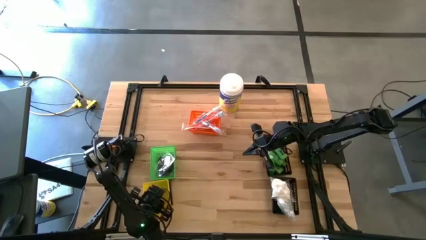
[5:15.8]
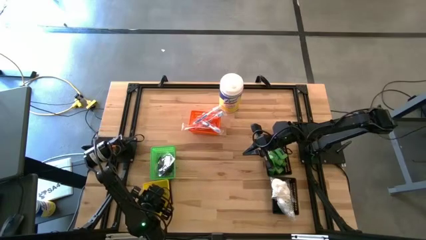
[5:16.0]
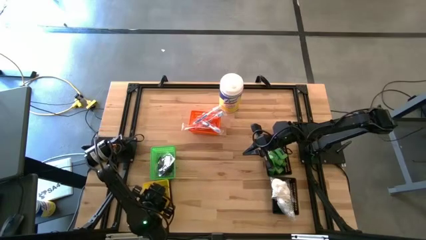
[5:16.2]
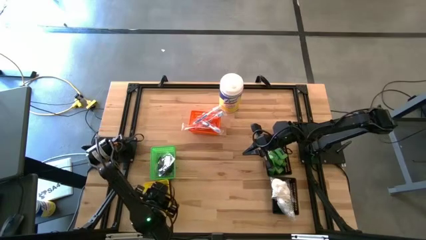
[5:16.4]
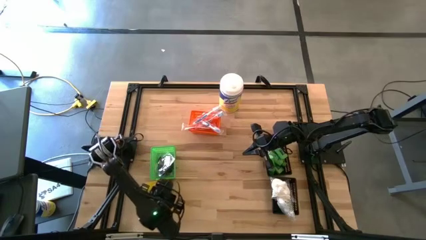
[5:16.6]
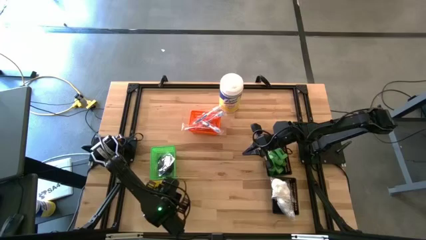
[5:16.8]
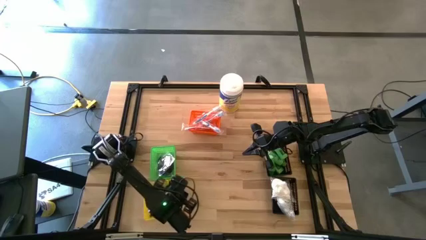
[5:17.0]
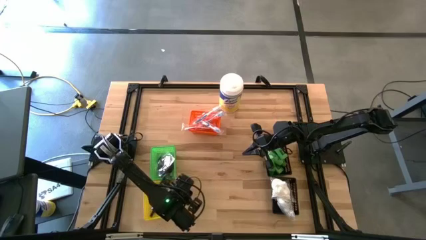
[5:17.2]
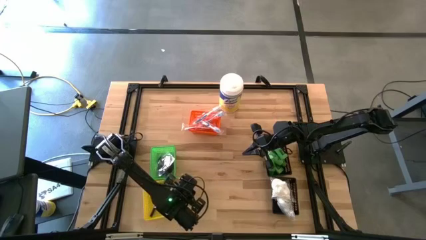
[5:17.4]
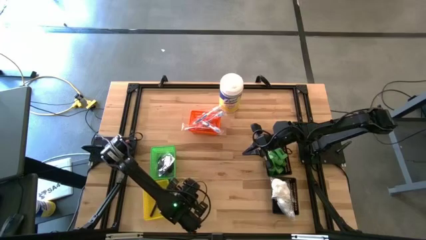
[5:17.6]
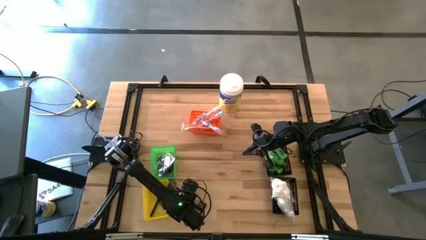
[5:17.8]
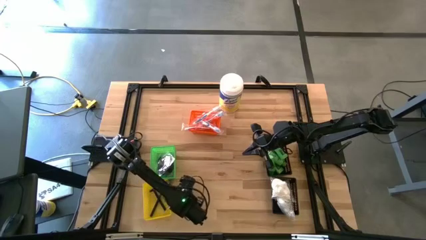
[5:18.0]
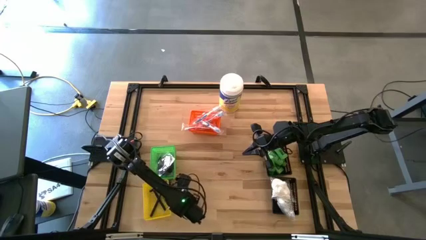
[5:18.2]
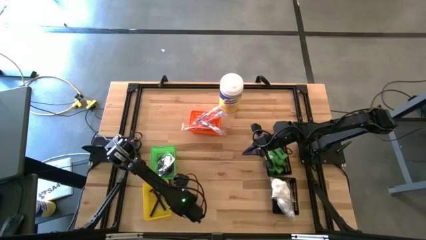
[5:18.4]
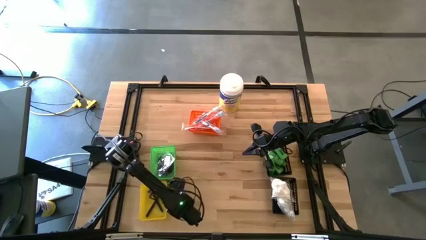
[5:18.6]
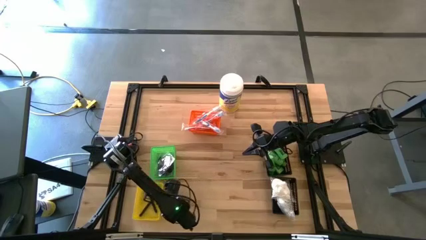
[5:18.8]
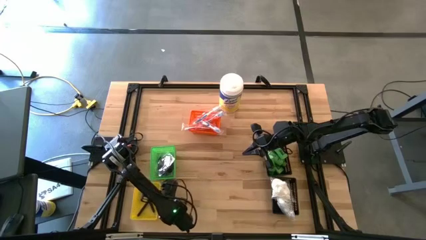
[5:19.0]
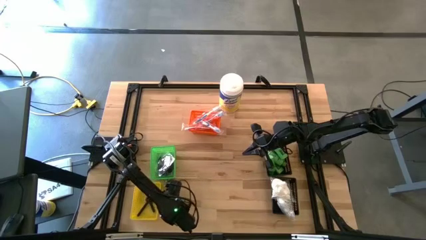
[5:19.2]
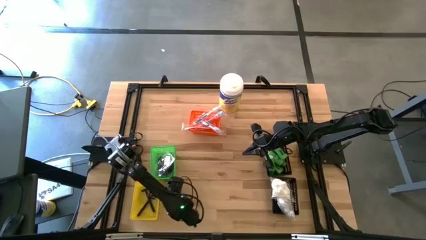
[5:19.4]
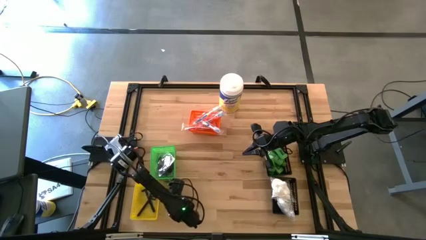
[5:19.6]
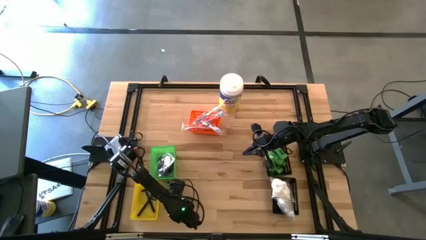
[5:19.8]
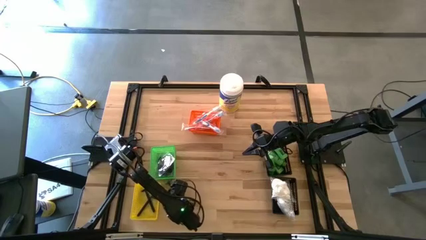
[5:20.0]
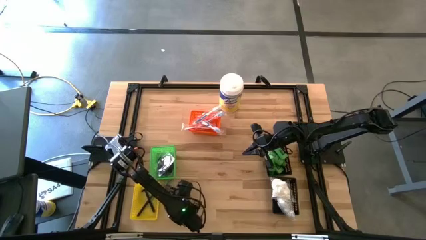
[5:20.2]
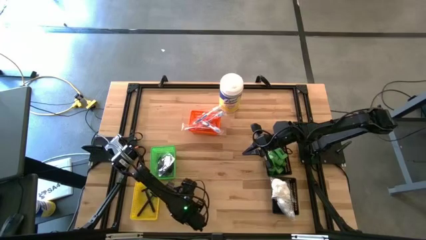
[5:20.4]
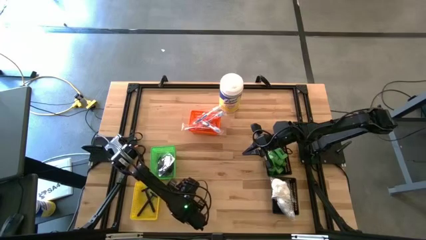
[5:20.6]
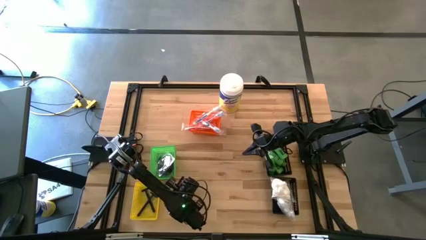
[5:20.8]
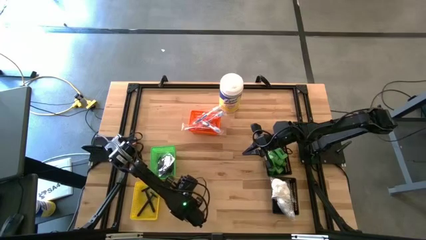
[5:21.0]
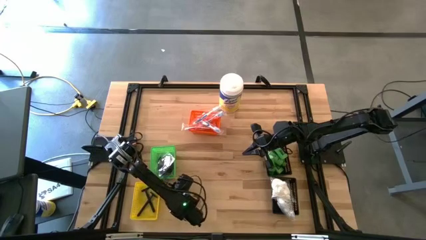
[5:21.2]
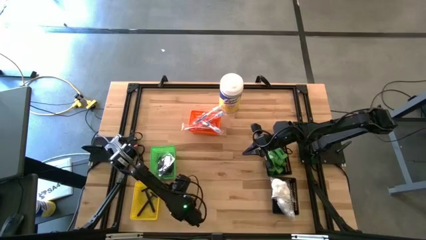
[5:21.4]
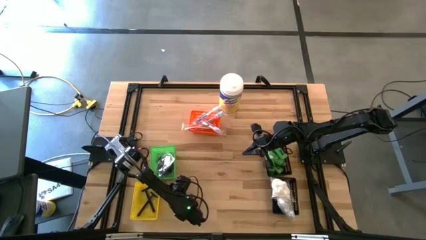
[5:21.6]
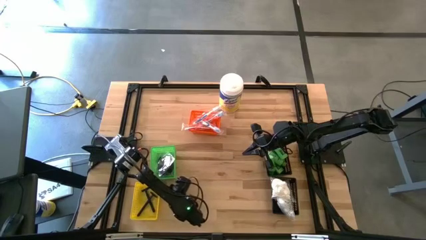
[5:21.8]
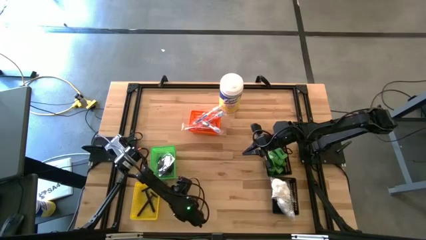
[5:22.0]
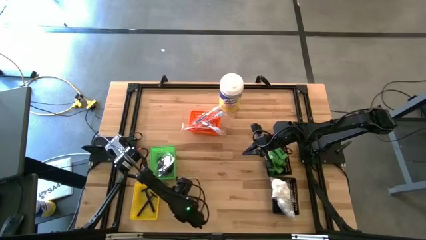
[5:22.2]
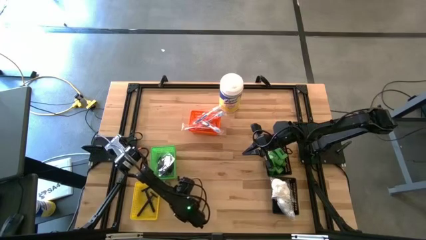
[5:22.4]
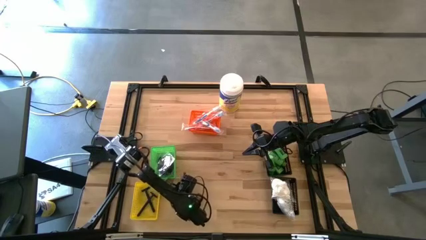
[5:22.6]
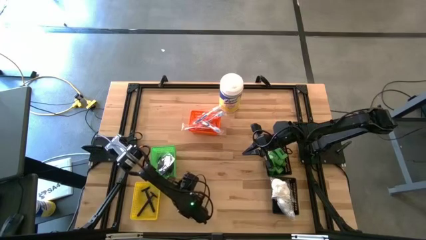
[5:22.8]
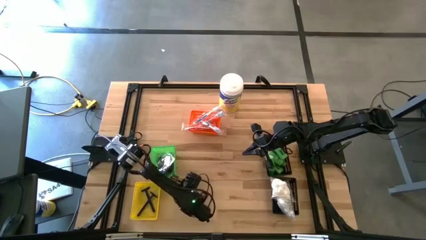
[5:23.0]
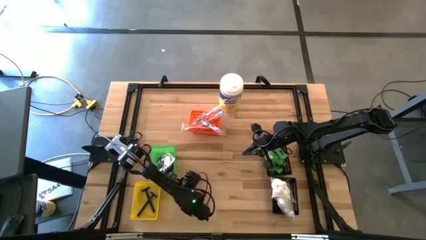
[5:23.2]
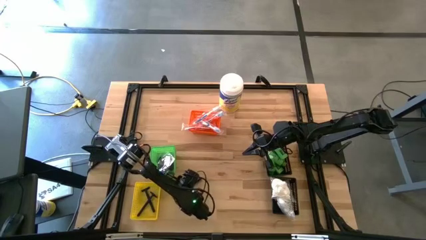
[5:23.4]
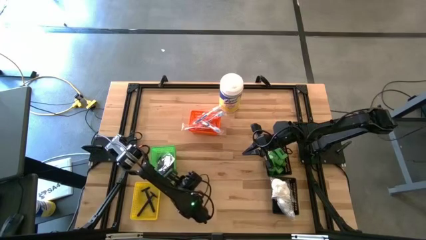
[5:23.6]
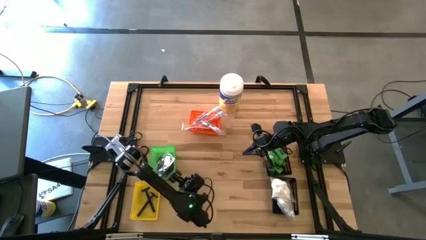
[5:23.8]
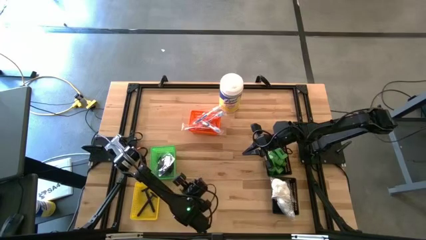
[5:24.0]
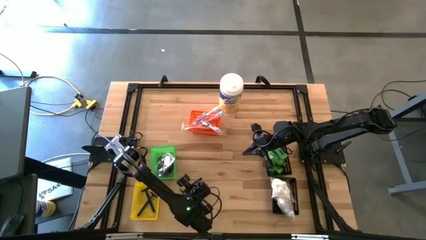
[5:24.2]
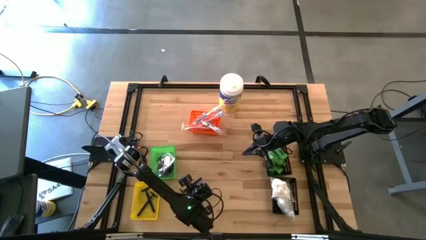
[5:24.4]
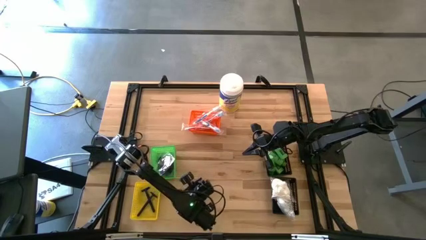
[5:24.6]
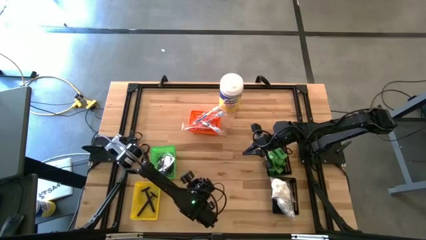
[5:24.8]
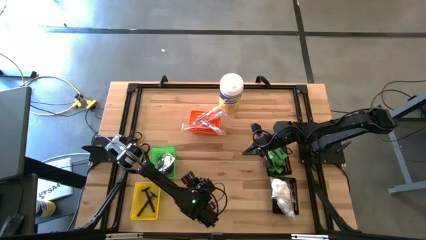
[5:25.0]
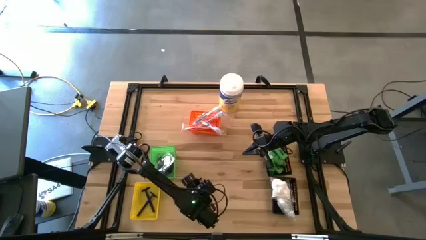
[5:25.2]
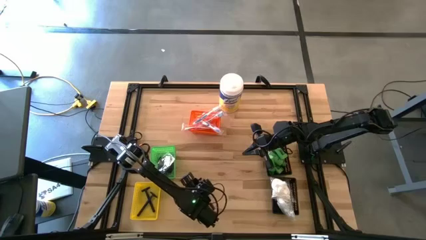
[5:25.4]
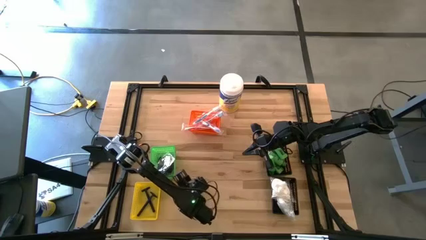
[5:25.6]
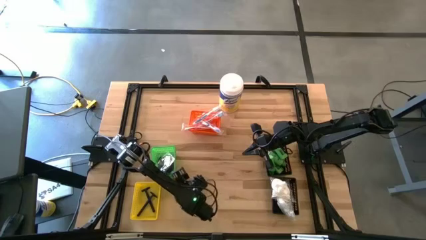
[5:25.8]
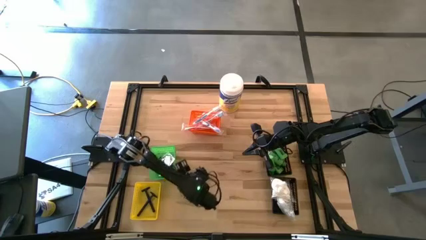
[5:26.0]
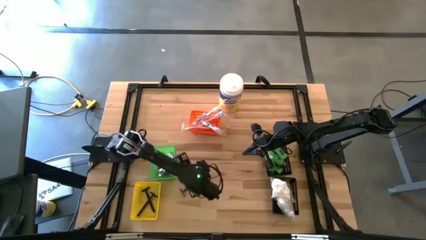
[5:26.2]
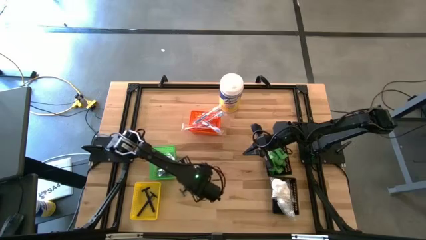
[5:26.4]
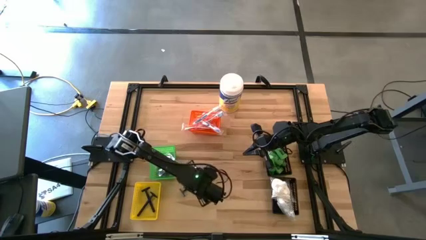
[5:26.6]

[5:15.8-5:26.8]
Task: Pick & Place Travel size toiletries
Put the blue razor into the yellow bin

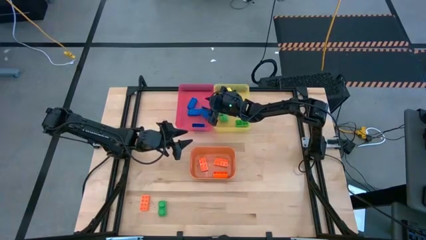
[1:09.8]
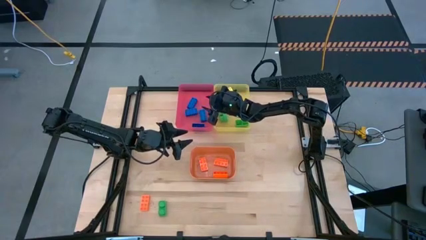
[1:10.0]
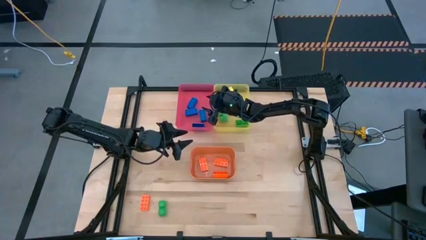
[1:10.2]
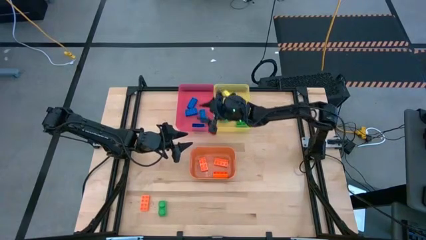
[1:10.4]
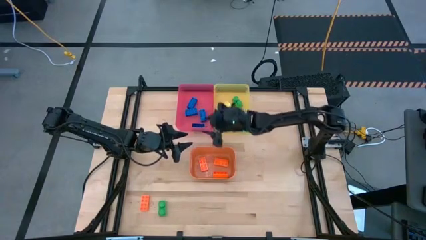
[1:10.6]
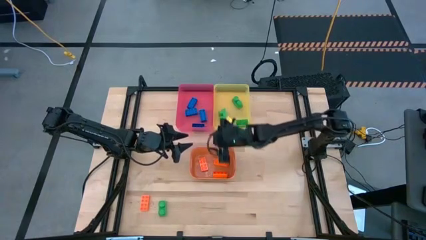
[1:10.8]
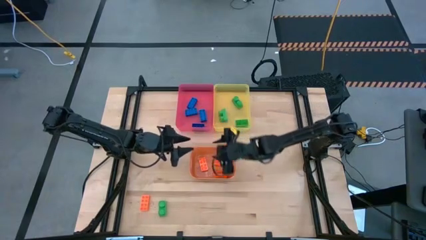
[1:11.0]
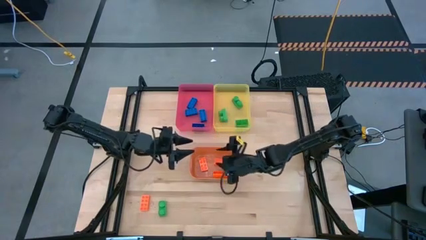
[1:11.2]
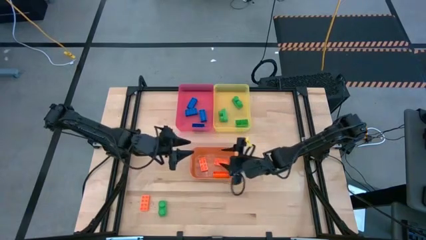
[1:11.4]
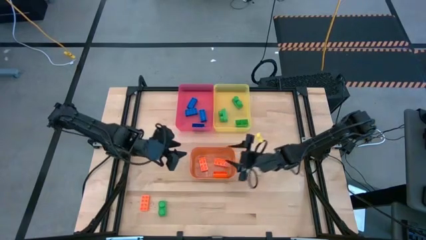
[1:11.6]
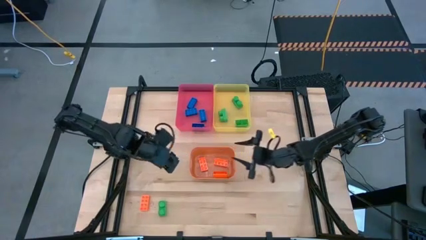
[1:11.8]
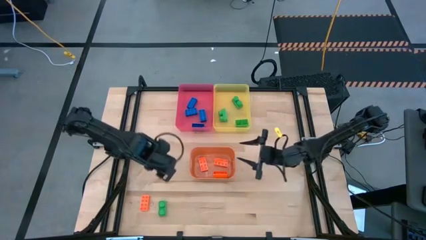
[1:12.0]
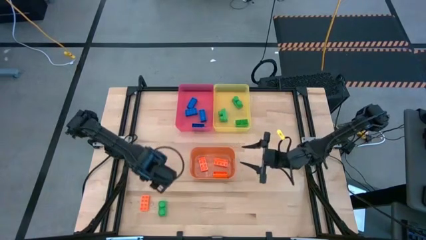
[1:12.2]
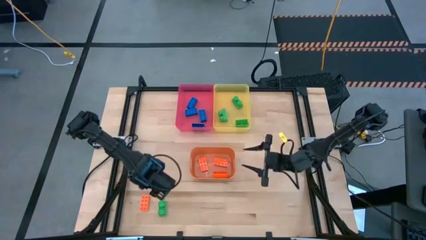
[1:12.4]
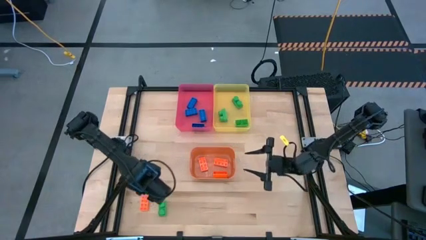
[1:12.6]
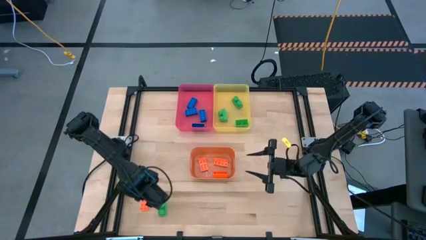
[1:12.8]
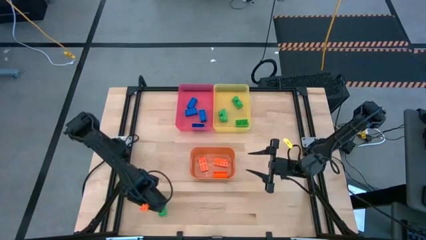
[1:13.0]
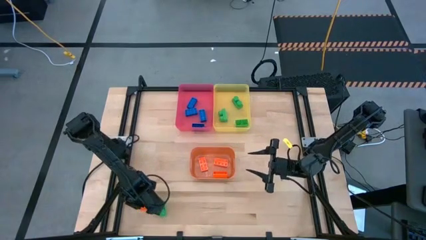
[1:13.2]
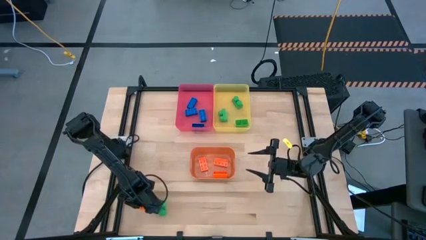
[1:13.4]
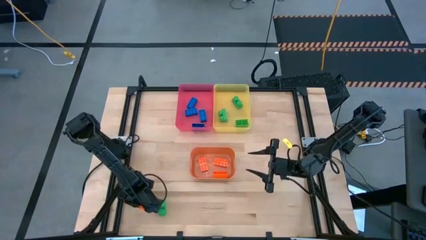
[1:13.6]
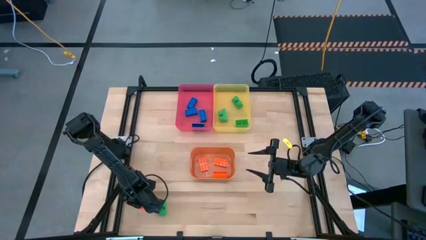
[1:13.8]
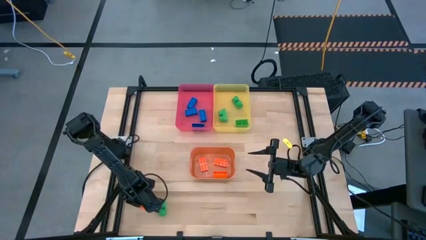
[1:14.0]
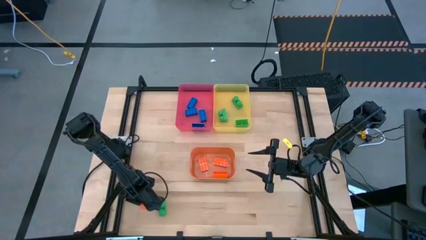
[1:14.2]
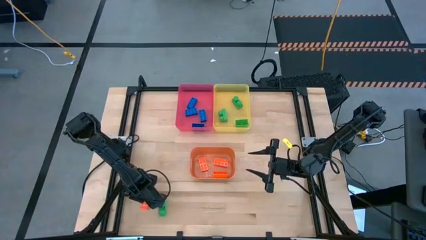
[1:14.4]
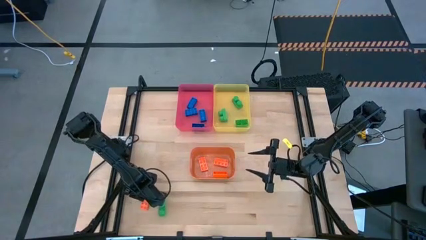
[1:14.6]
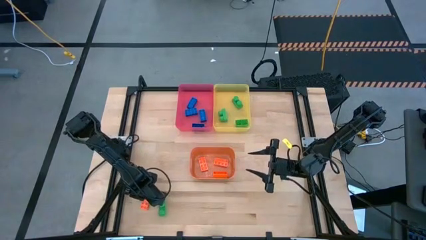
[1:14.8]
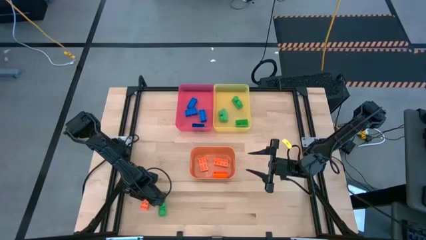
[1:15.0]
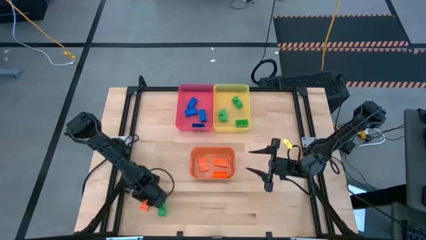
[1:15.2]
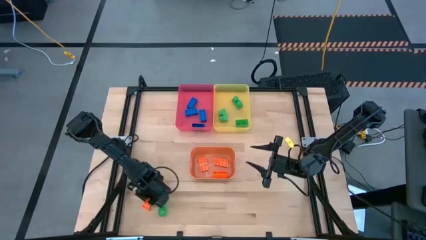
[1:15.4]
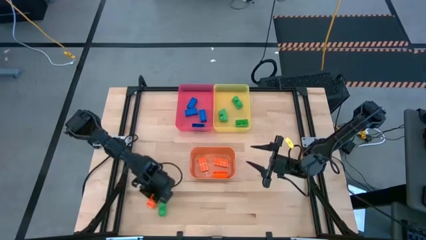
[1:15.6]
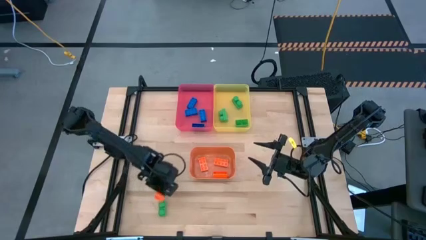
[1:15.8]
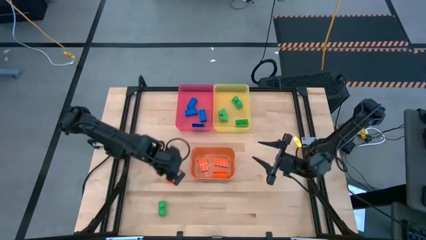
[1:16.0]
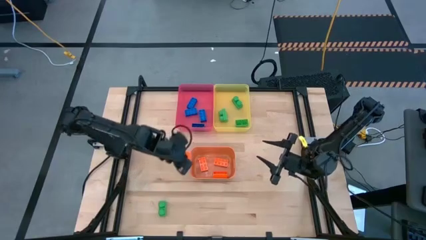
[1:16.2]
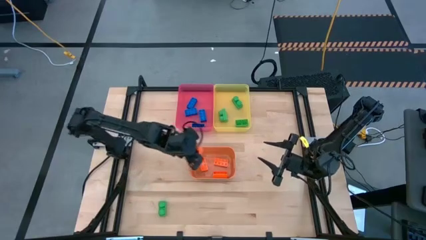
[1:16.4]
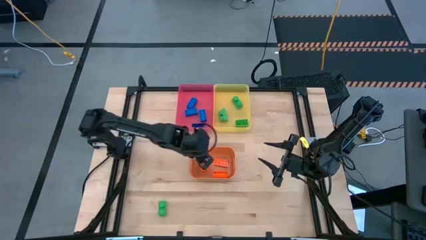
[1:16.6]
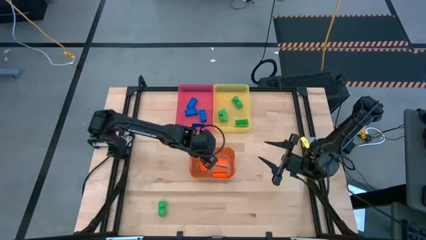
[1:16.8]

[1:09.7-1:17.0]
Task: Sort & place blocks by color
Put the orange game piece into the orange bin
